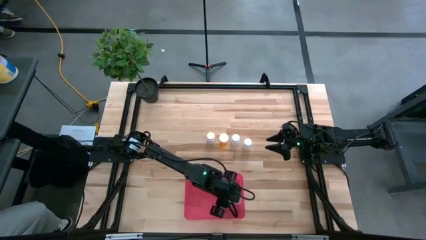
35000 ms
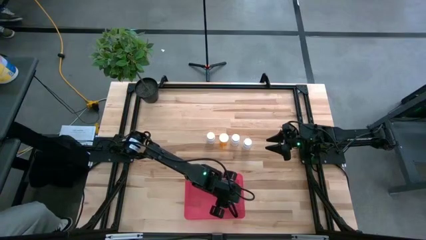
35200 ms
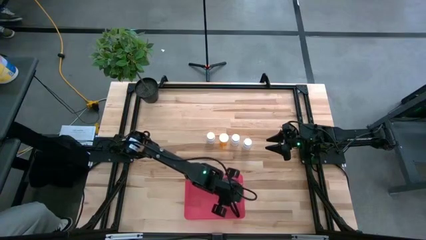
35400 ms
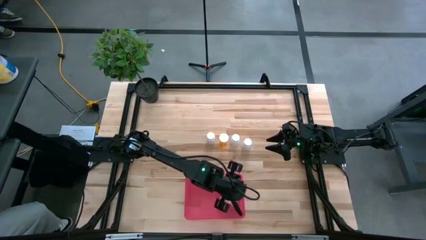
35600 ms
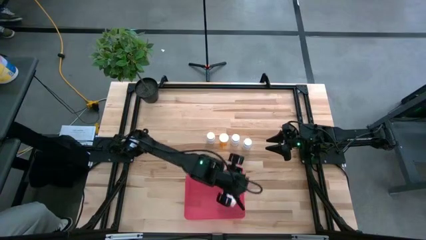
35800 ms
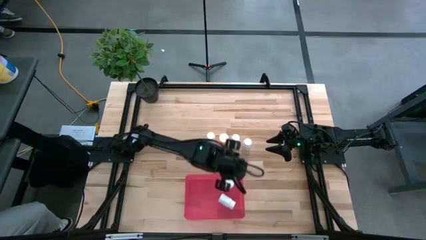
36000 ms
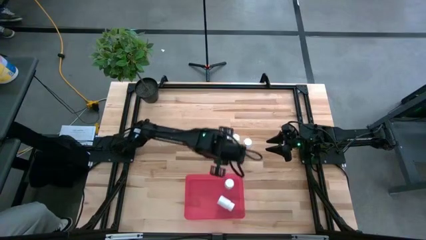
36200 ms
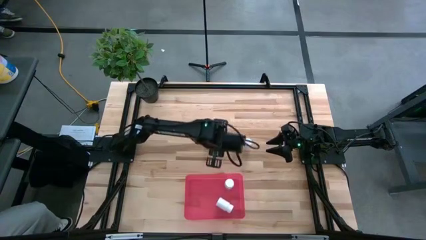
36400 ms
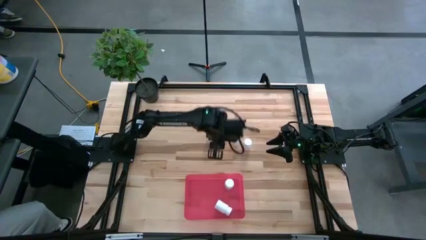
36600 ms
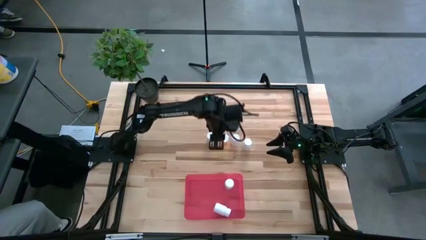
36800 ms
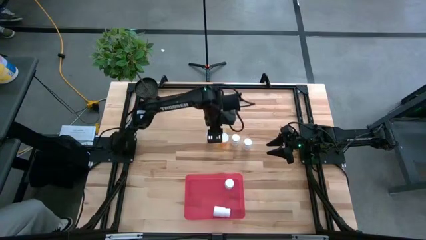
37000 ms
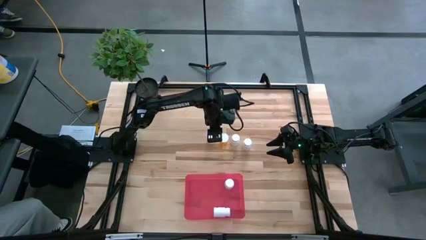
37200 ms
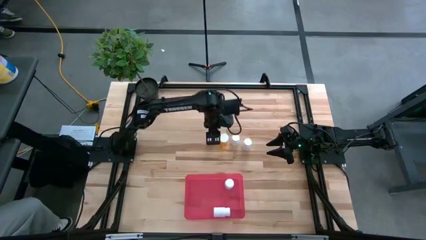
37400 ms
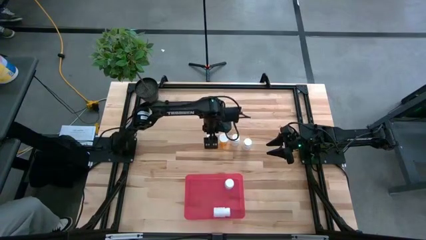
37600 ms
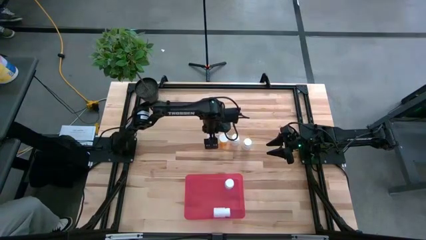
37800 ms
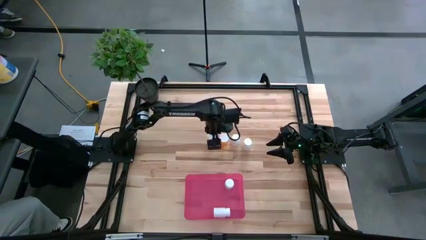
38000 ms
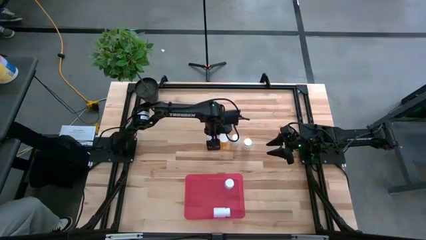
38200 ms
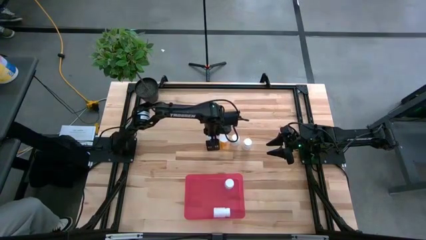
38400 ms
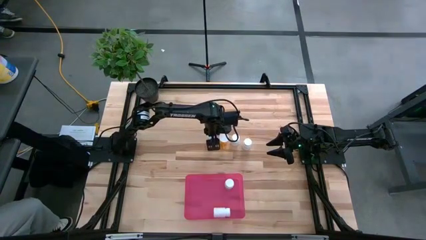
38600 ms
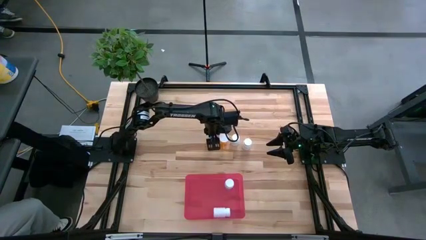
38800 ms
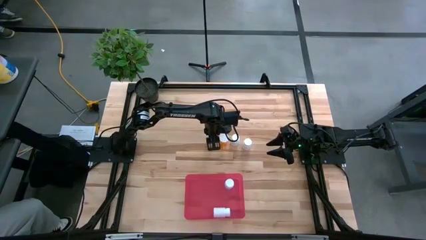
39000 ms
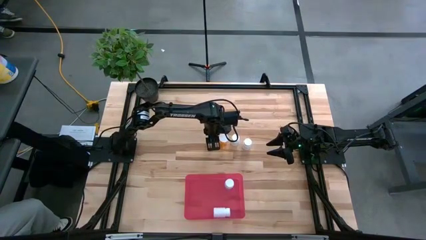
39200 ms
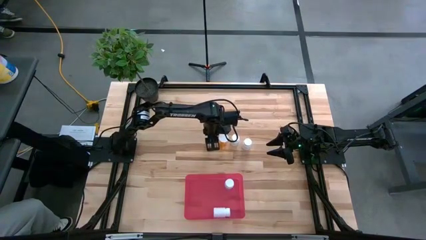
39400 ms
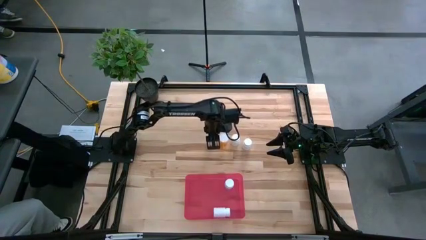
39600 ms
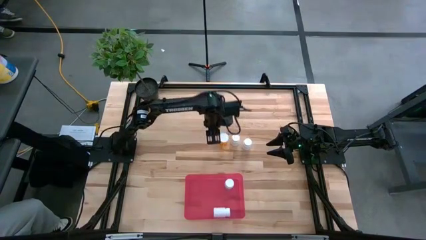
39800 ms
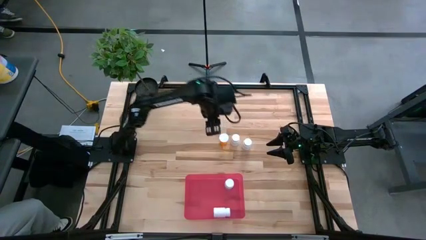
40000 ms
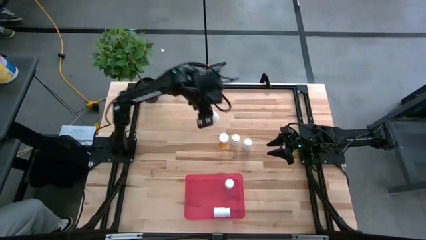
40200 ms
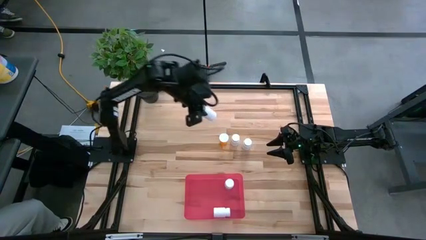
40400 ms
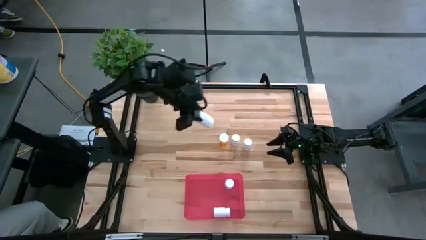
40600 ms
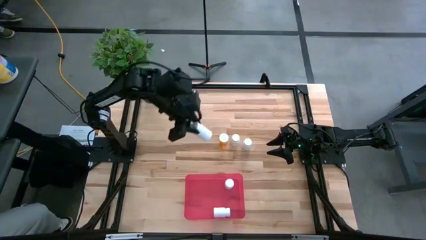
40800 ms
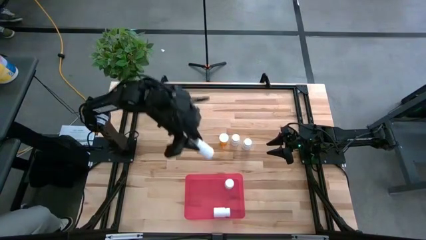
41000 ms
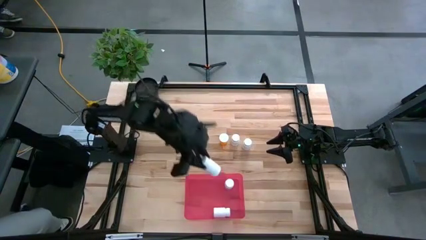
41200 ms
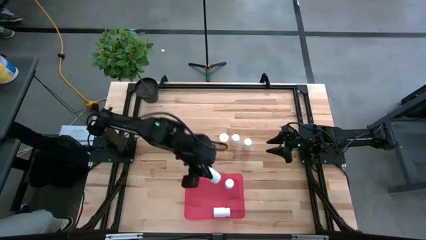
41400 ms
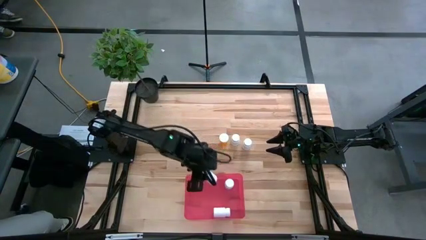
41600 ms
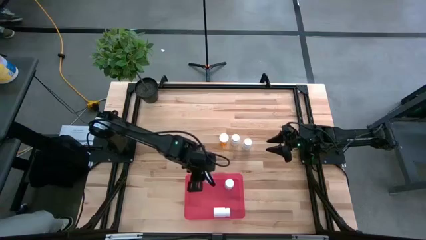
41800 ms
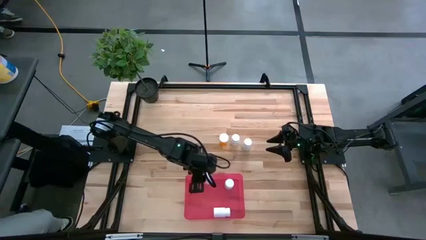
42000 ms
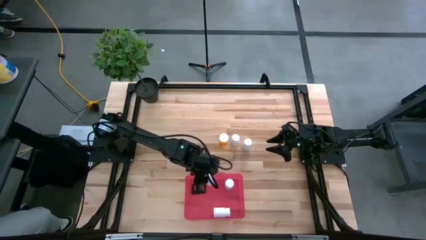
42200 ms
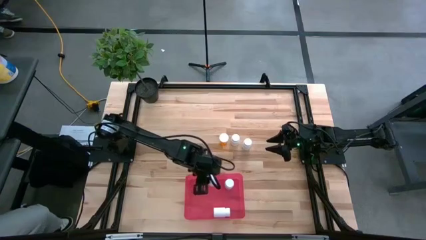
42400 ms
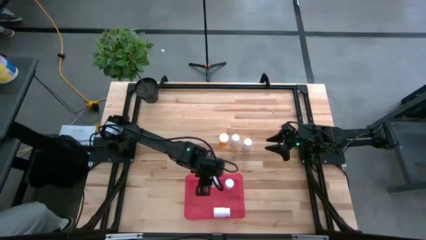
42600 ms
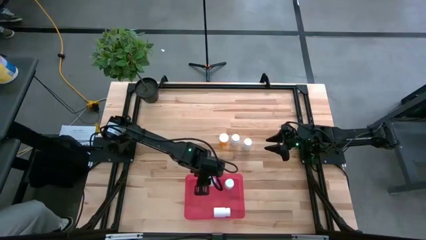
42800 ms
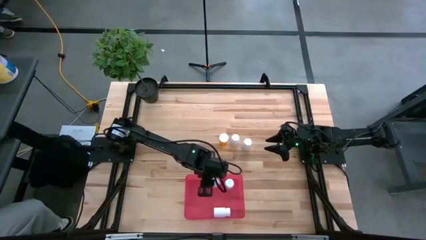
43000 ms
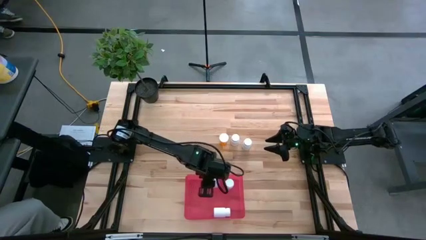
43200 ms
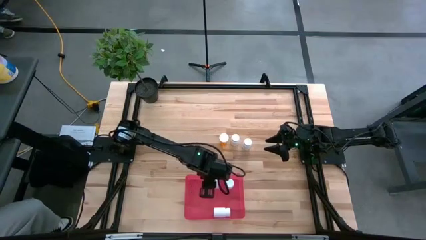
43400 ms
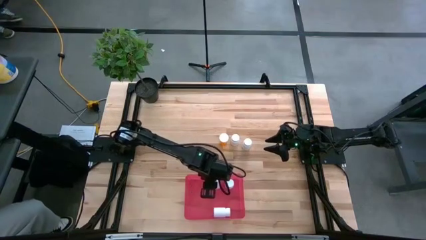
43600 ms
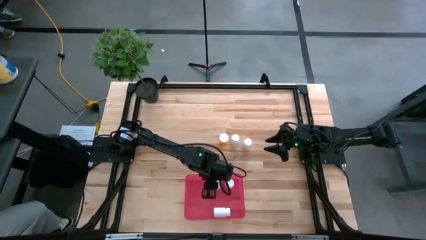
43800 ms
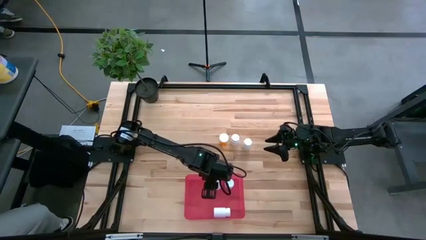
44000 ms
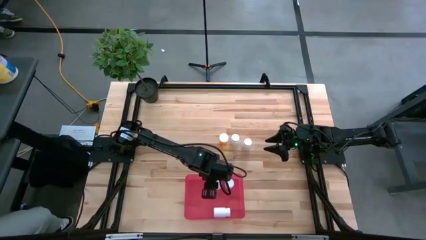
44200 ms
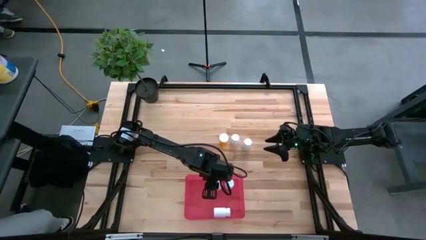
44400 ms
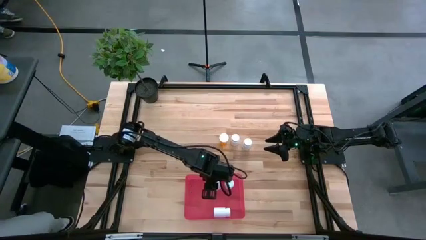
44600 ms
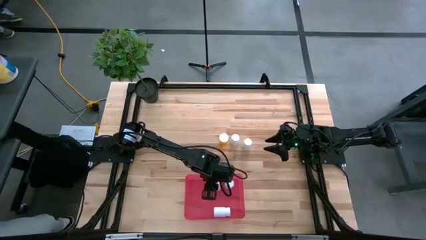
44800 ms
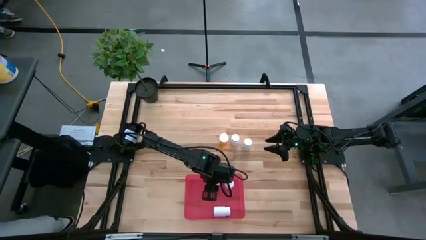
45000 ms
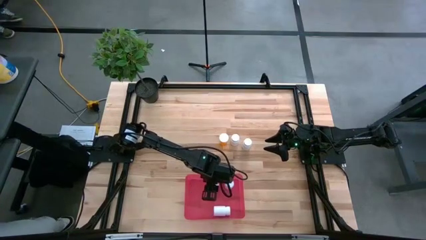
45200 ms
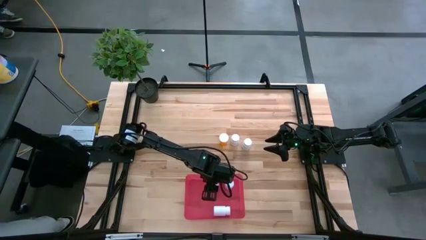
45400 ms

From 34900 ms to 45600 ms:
Task: Pick and place pill bottles into a basket
Put the white pill bottle into the red bin

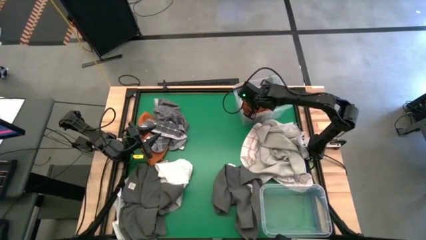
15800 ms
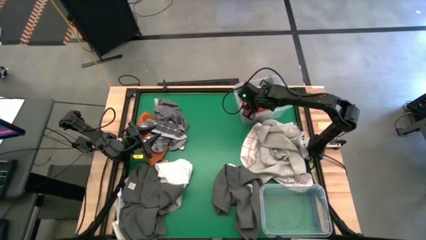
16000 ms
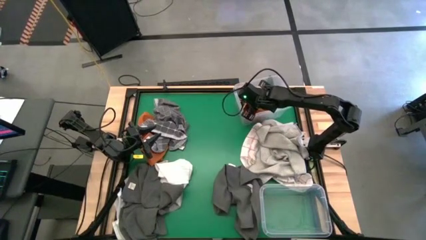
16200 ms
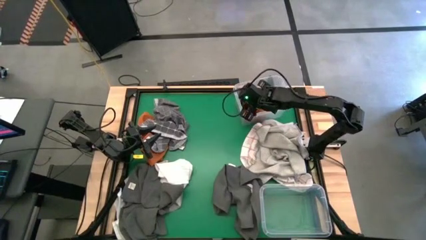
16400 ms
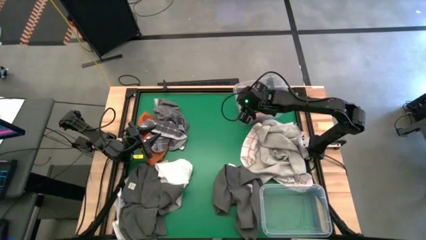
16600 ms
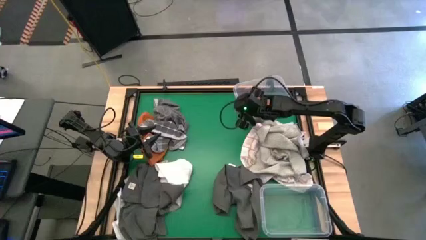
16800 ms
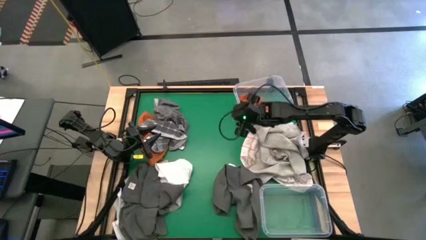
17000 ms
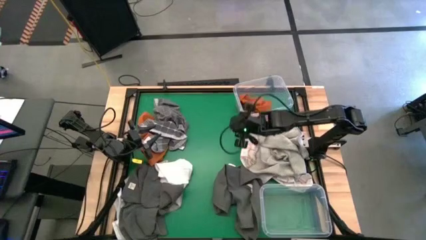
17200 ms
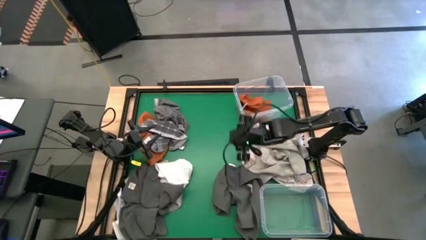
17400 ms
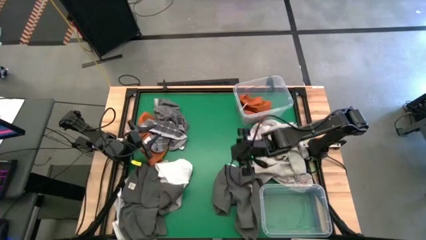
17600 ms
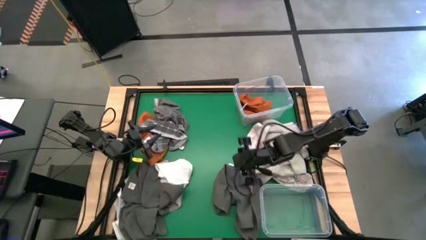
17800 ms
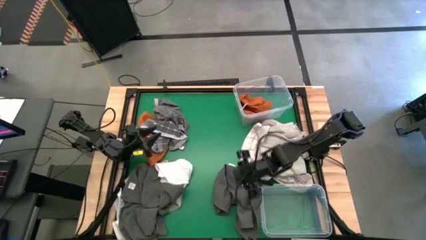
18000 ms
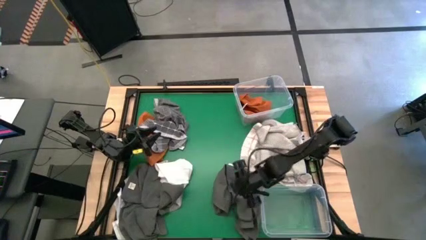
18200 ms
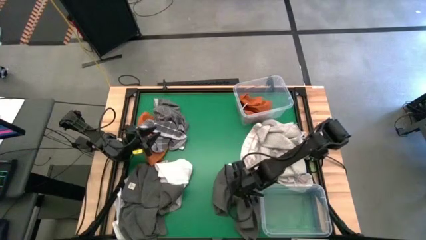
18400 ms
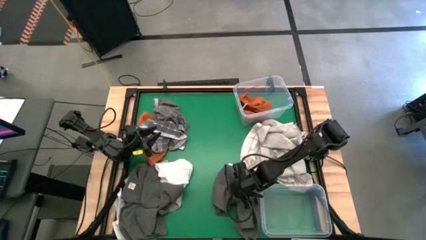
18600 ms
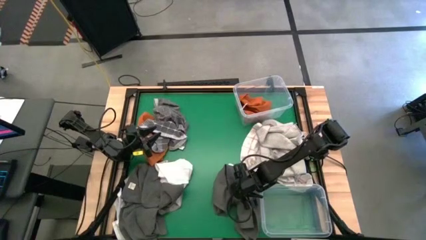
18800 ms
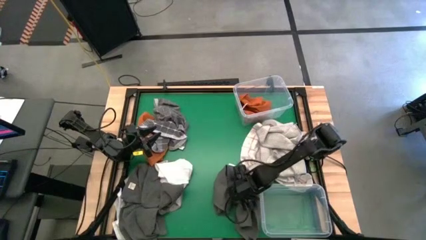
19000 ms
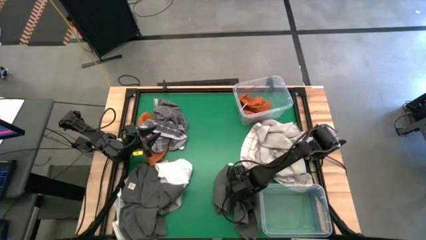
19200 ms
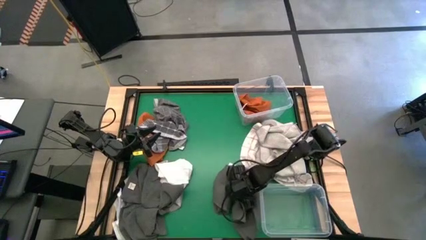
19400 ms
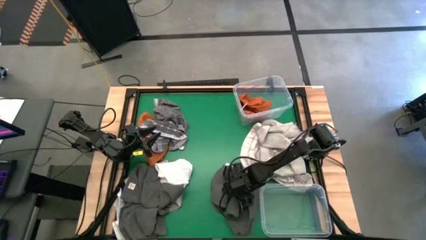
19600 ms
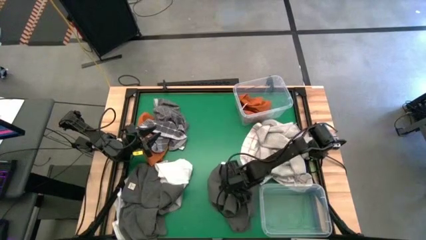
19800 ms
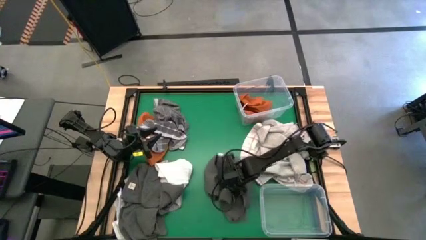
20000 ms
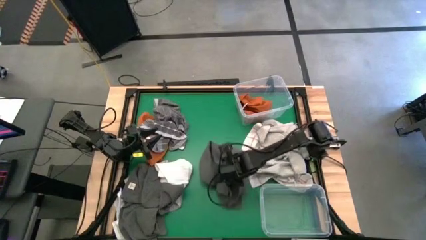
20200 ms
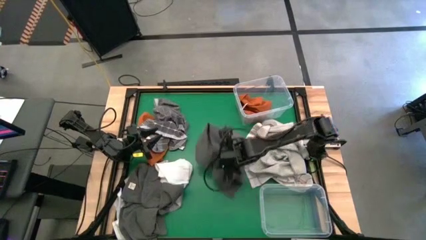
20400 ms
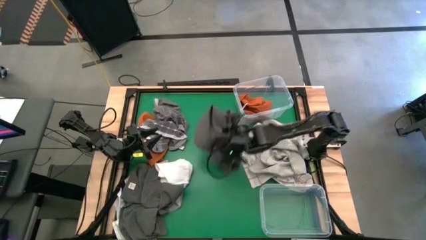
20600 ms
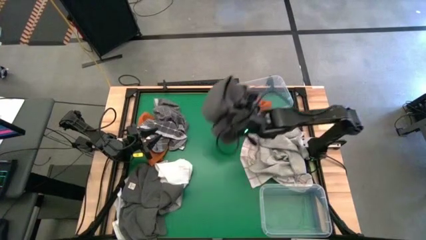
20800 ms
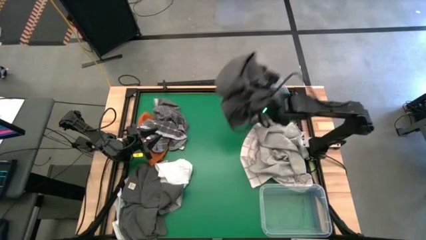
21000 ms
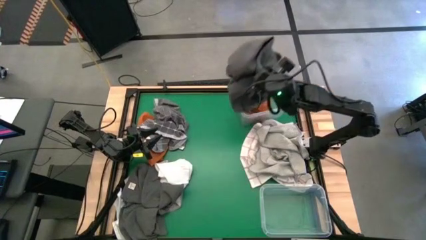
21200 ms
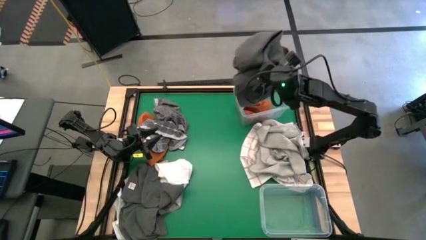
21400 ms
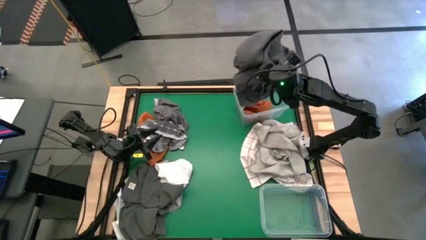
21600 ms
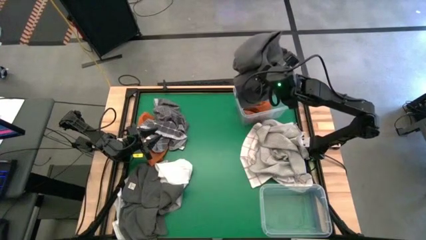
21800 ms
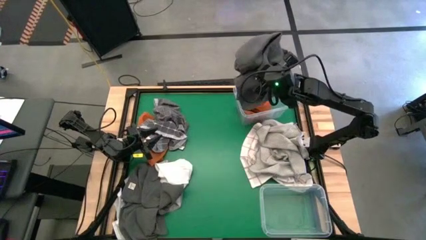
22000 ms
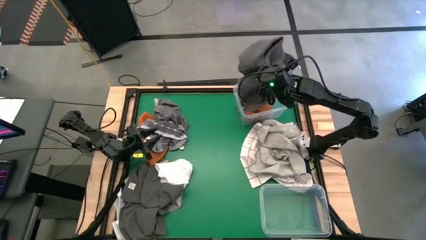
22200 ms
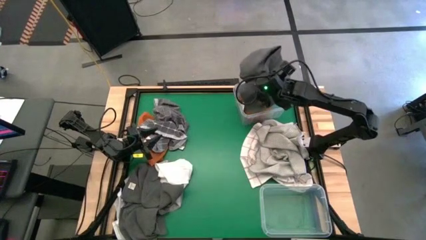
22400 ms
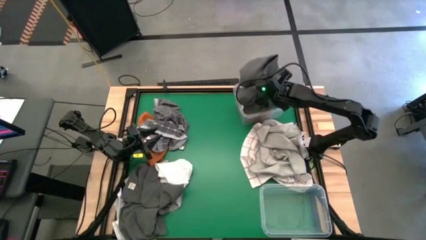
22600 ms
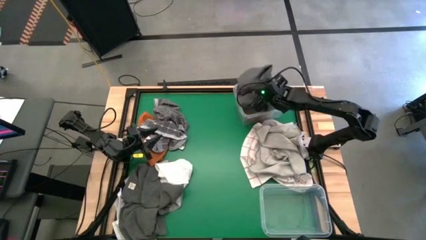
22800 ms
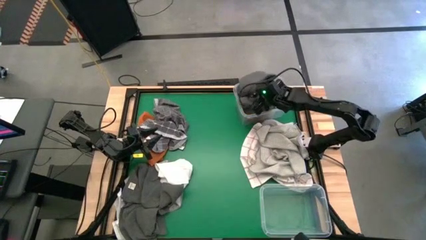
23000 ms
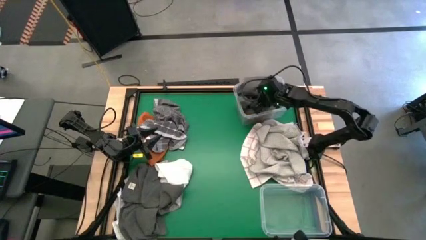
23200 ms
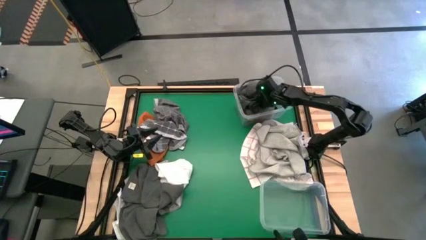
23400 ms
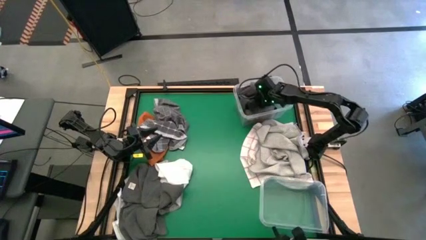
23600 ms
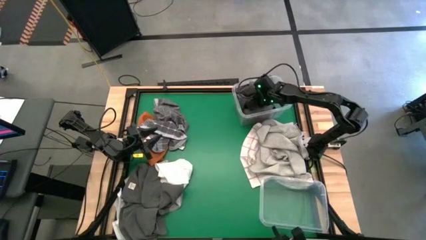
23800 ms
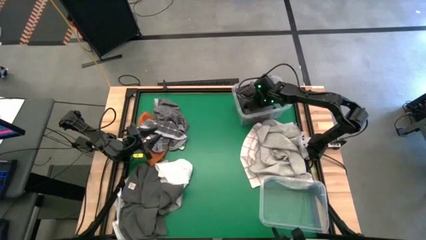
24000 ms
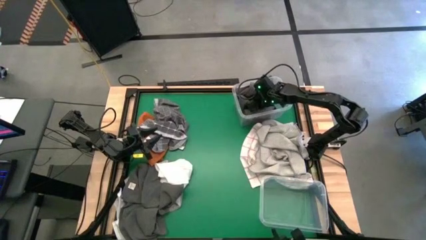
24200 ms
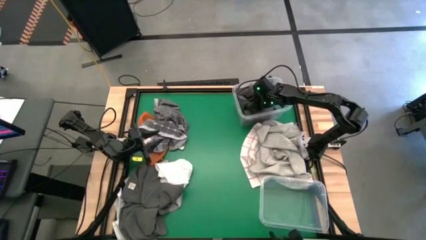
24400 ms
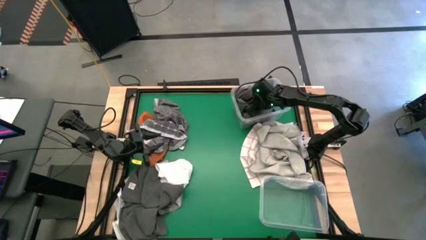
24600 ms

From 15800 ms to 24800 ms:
Task: Sort towels by color in basket
Put the dark gray towel into the top transparent bin
